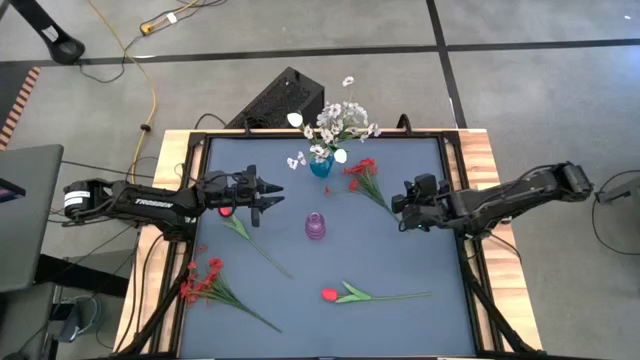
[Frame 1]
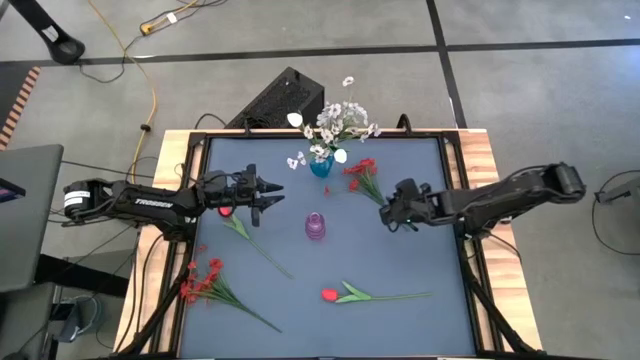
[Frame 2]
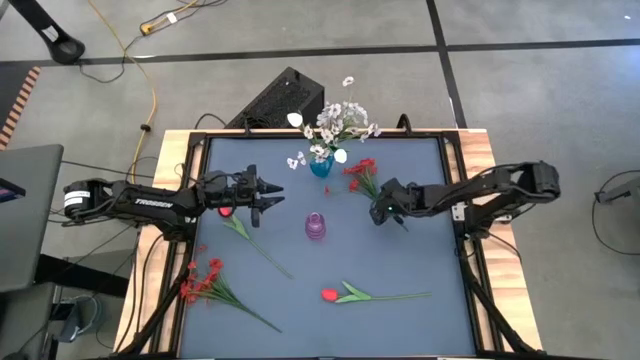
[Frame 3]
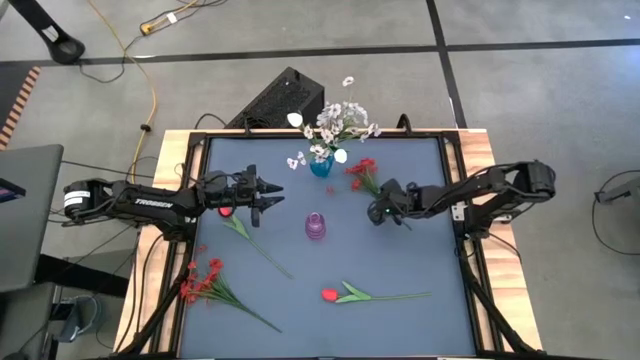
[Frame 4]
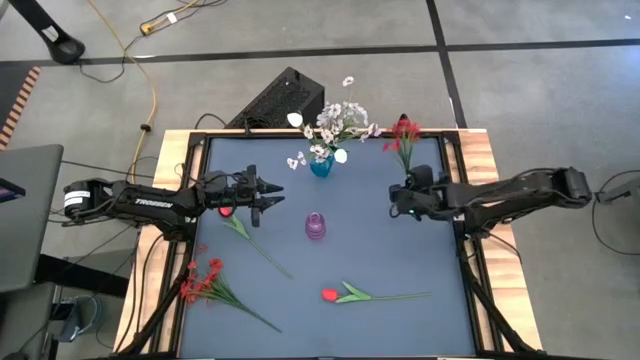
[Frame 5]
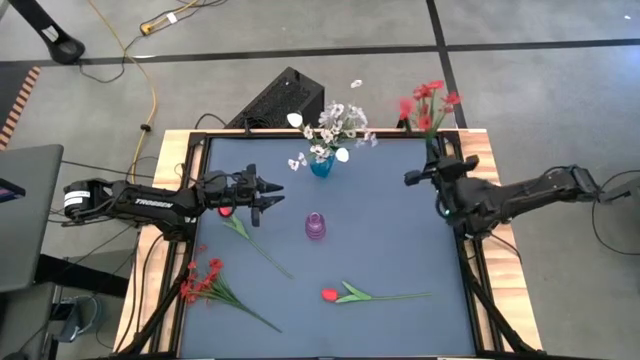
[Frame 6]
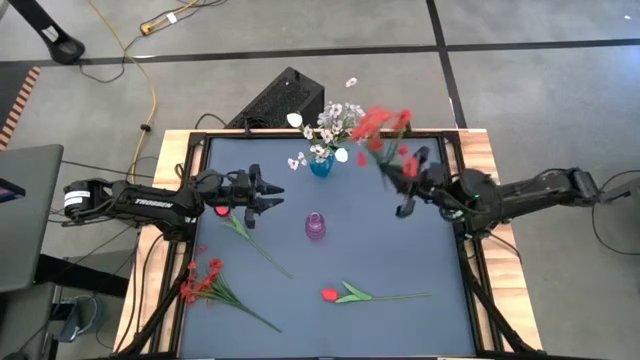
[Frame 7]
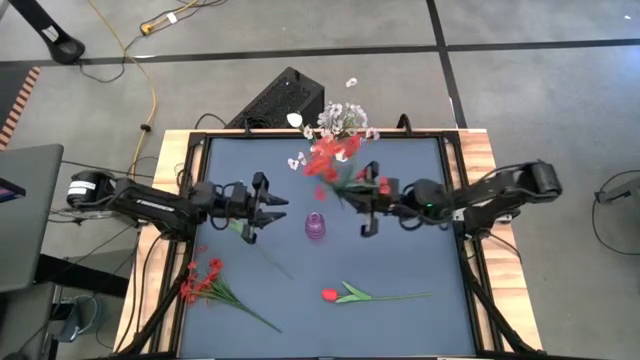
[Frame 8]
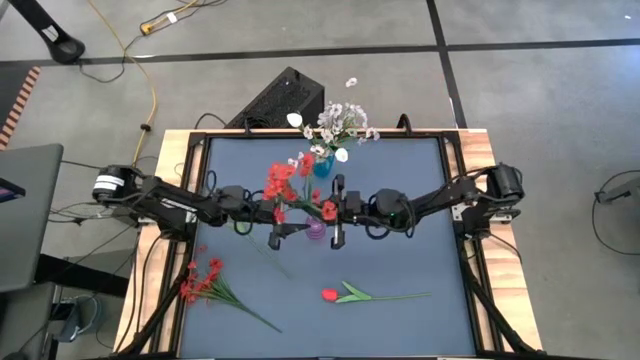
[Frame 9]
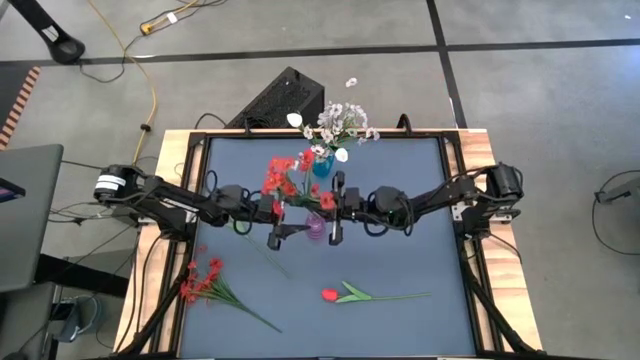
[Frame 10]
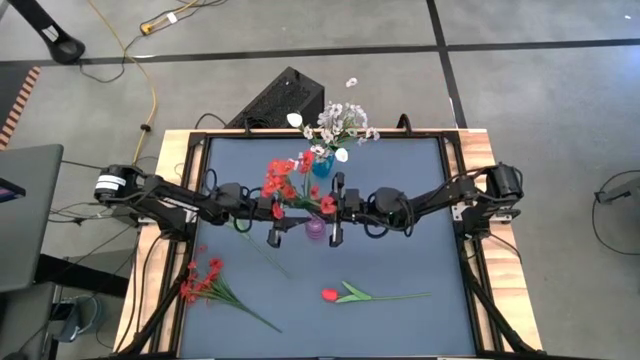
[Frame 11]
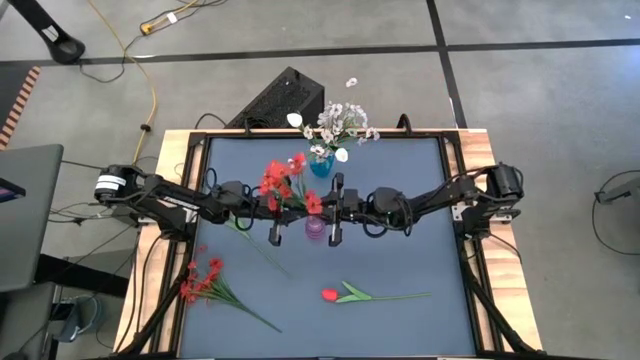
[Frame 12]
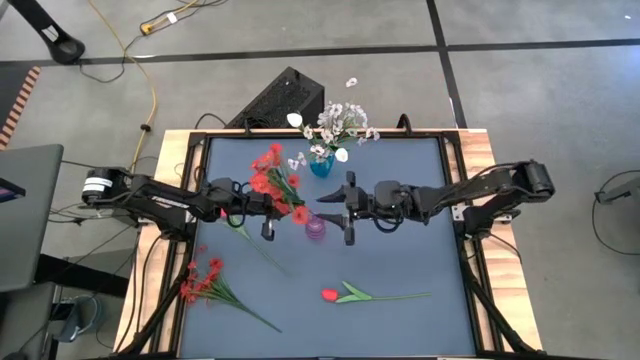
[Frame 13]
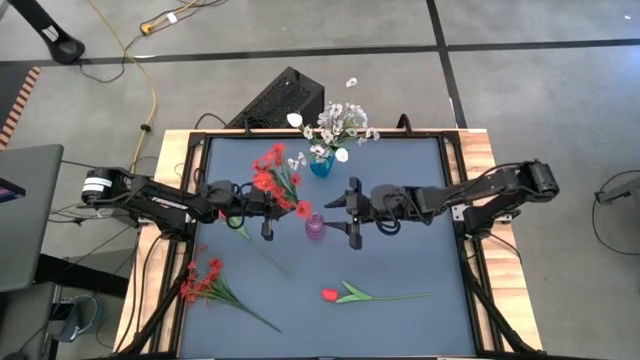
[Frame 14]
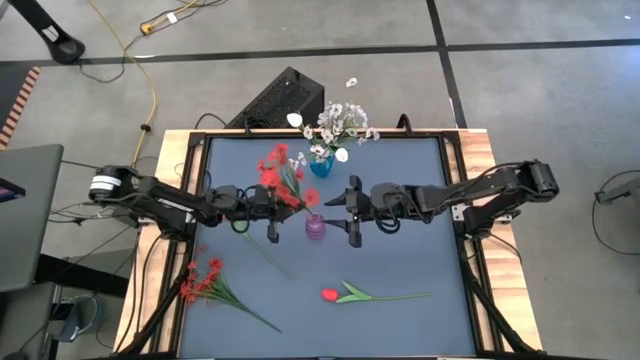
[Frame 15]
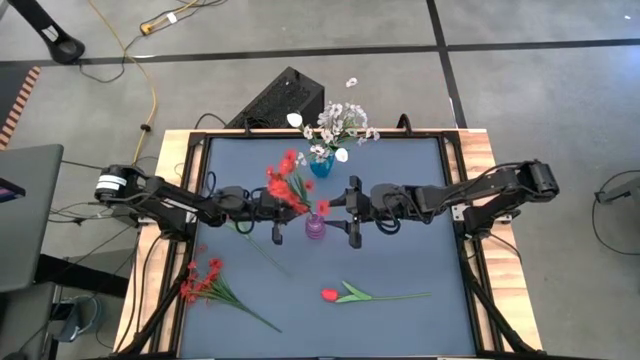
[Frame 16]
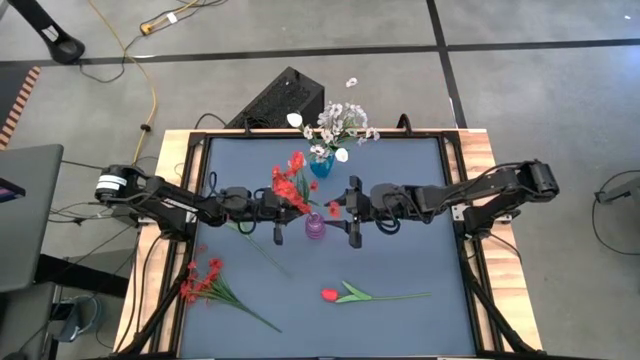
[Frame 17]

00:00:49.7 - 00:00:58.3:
Task: Sort flowers into vase by color
Put the top red flowers into the purple vase

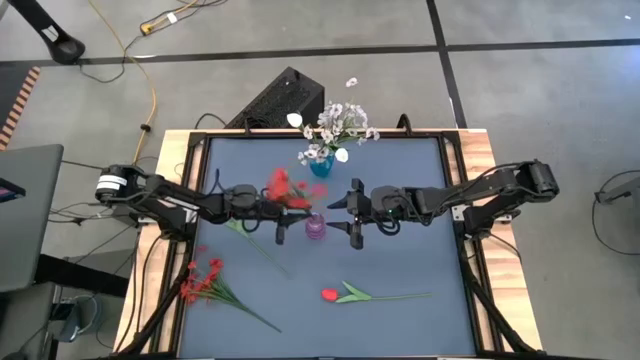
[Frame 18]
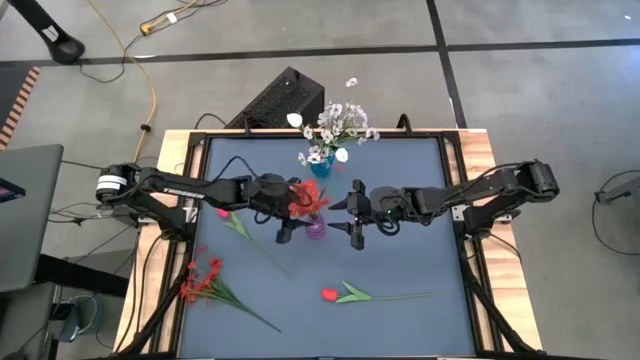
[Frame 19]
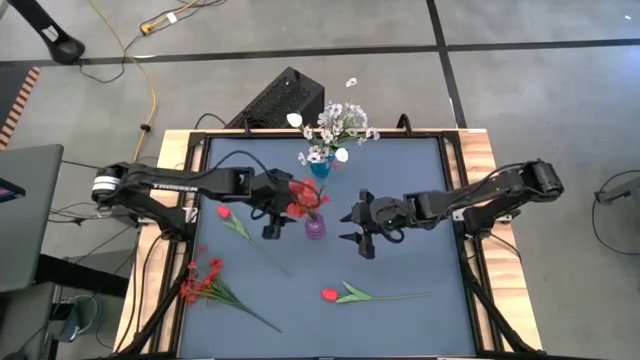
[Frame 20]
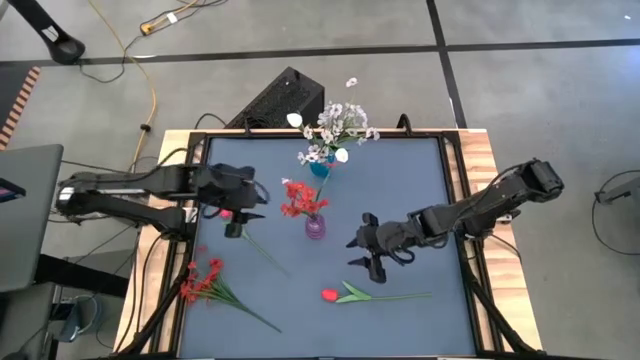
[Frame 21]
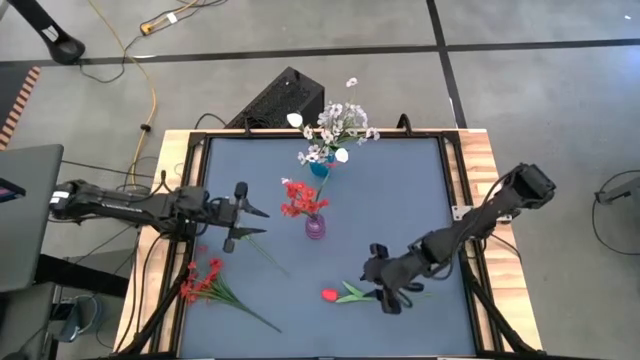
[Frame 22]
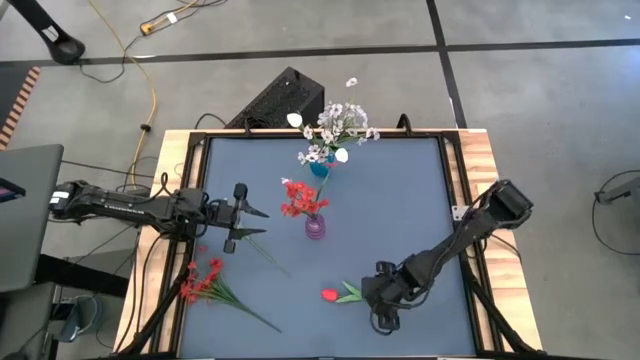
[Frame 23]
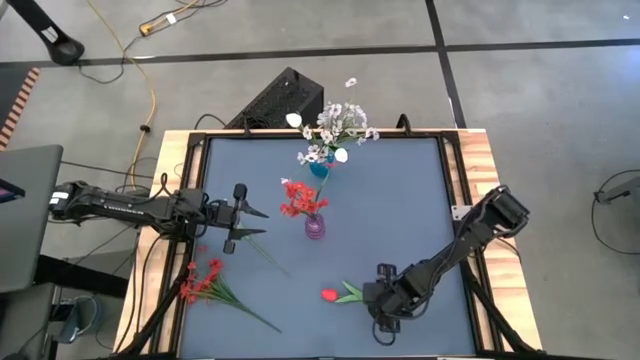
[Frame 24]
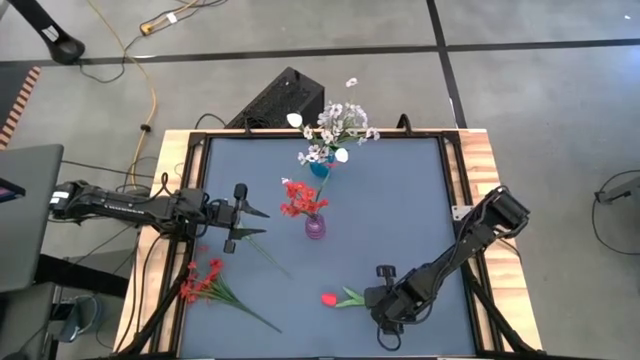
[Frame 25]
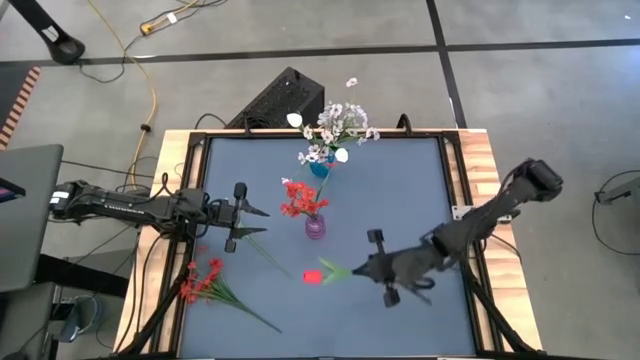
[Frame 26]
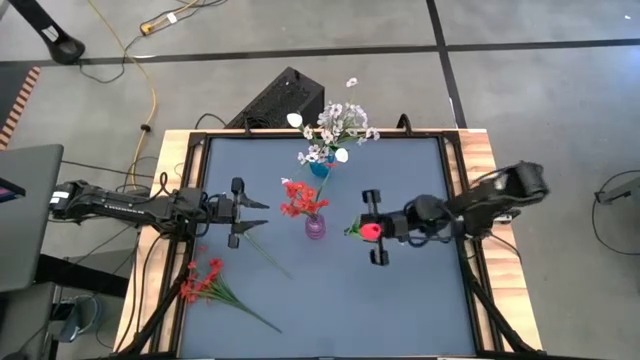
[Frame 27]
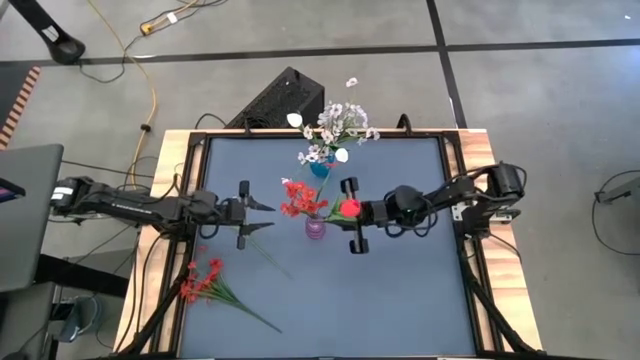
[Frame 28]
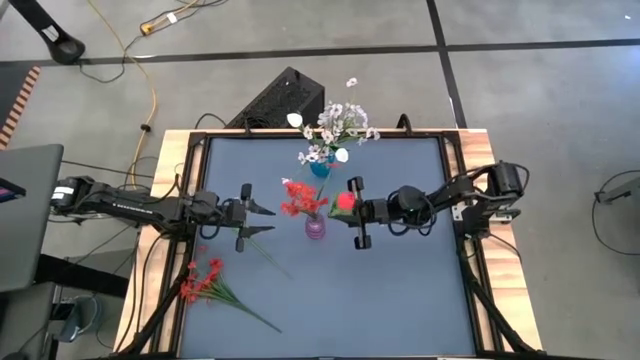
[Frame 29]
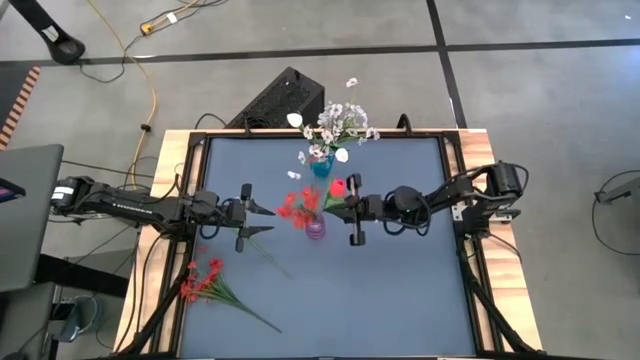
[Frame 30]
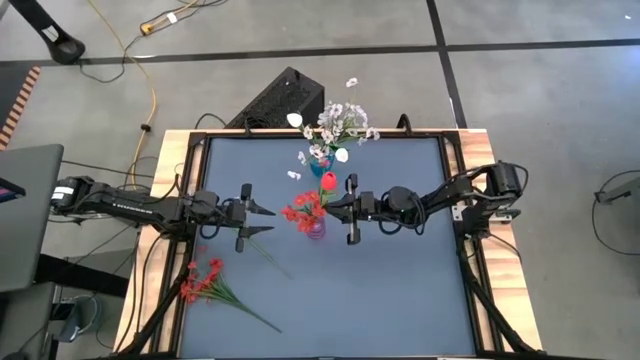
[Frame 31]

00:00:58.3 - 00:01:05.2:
Put the bottom red tulip into the purple vase

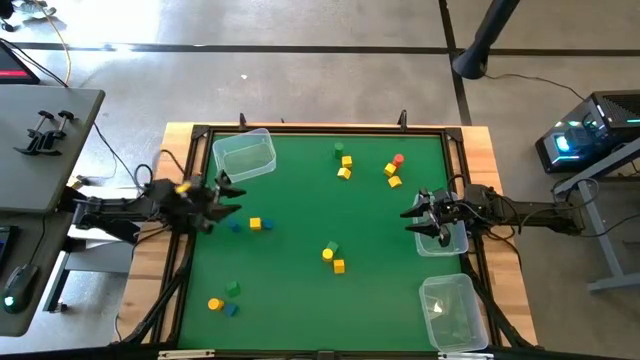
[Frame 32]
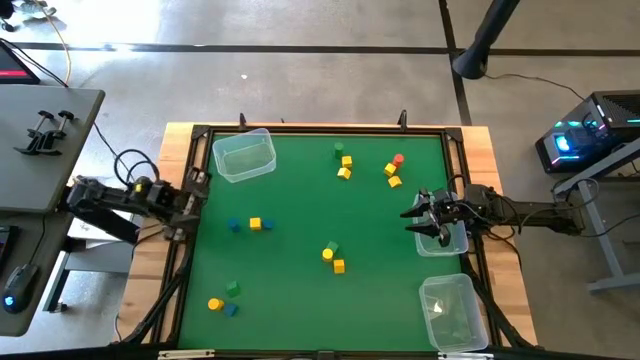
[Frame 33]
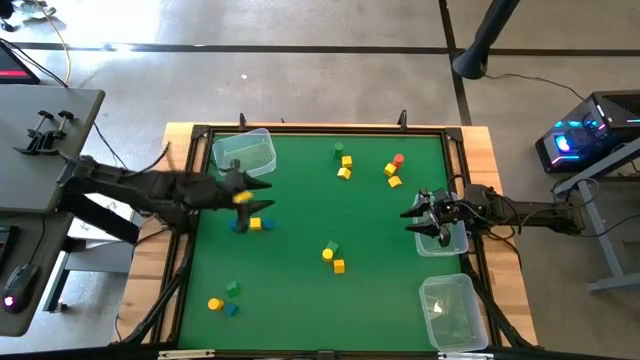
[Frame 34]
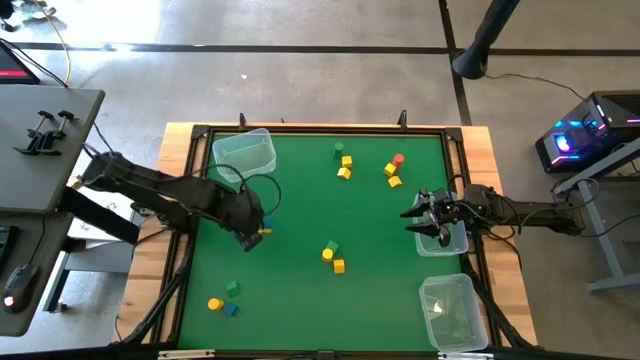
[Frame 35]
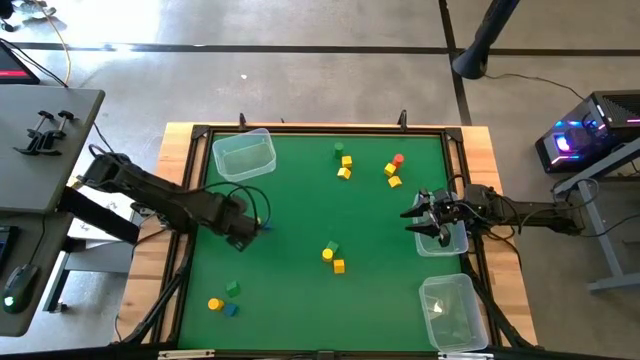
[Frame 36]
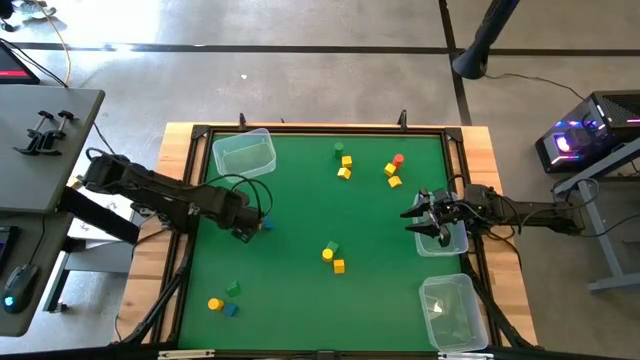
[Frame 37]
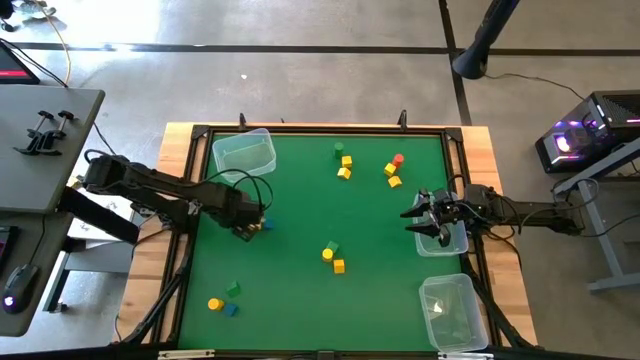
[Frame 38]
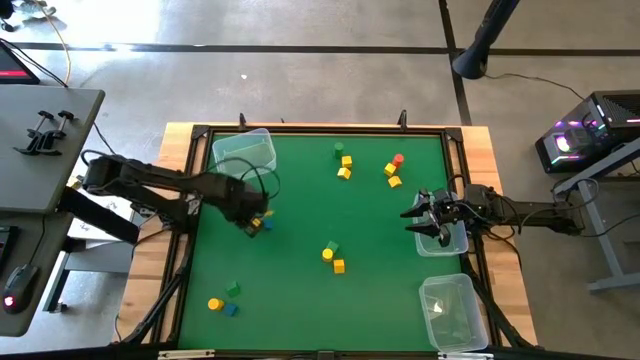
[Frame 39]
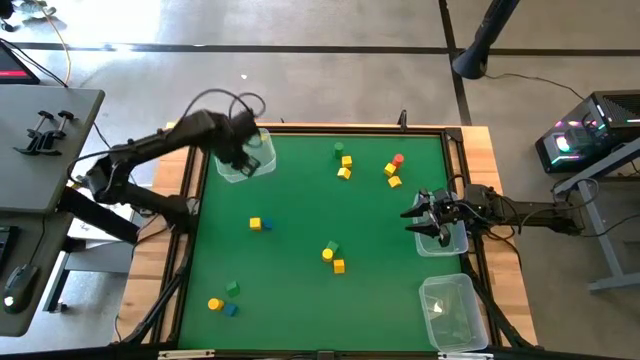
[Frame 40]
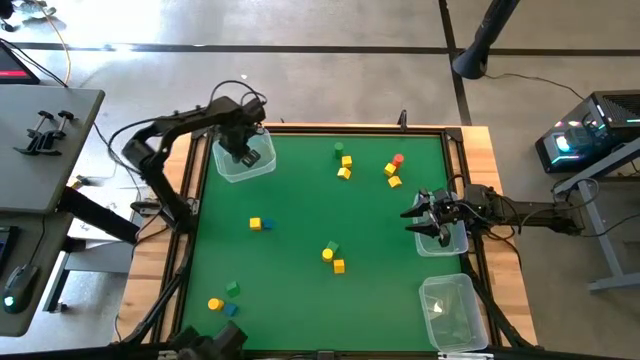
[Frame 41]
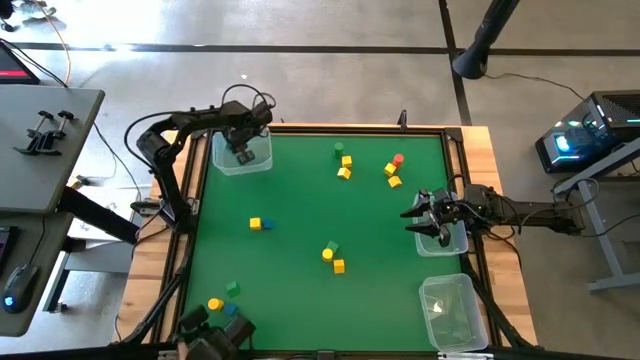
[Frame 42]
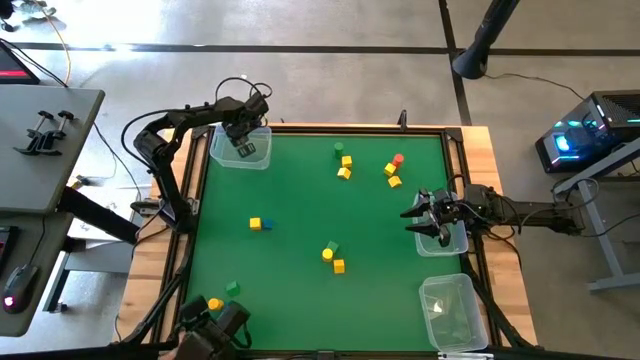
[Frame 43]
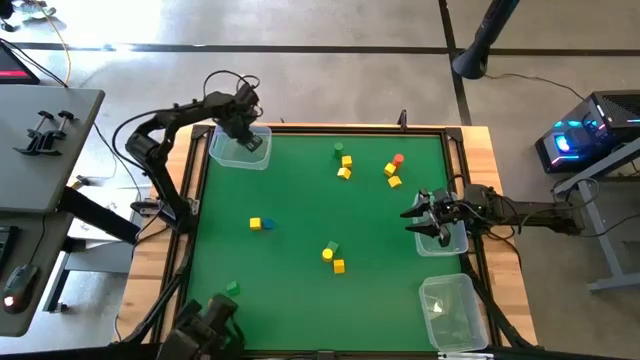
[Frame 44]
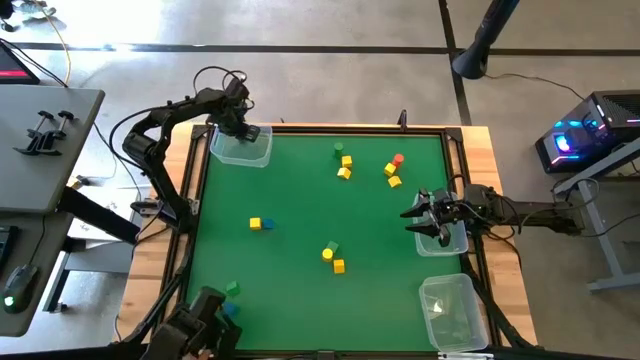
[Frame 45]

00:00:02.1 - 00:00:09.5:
Task: Sort blocks by size
Put the blue cylindrical block into the top transparent bin
